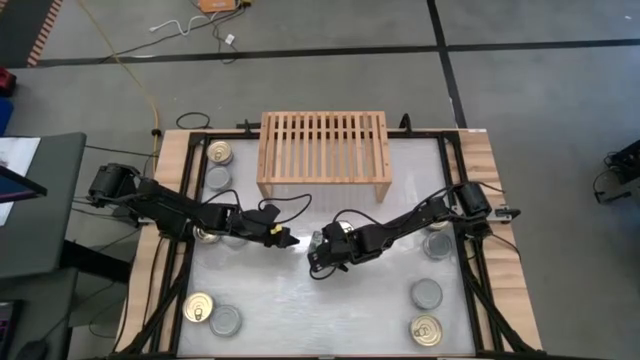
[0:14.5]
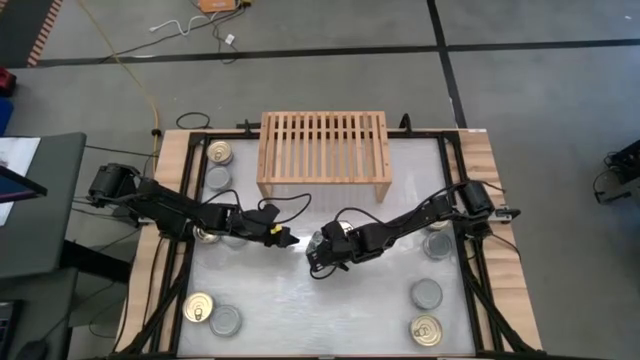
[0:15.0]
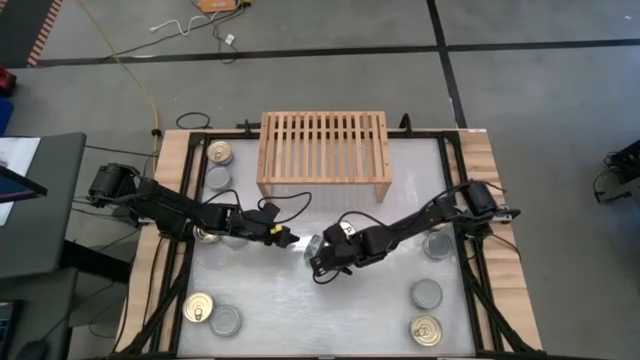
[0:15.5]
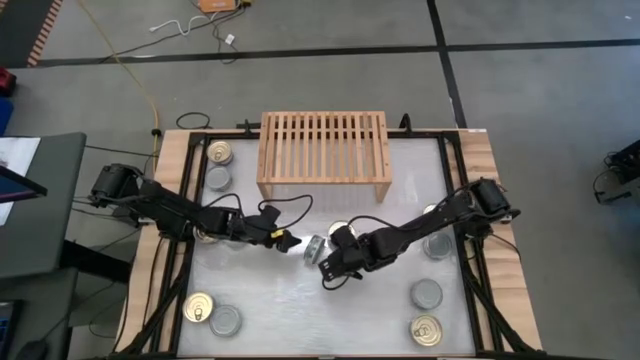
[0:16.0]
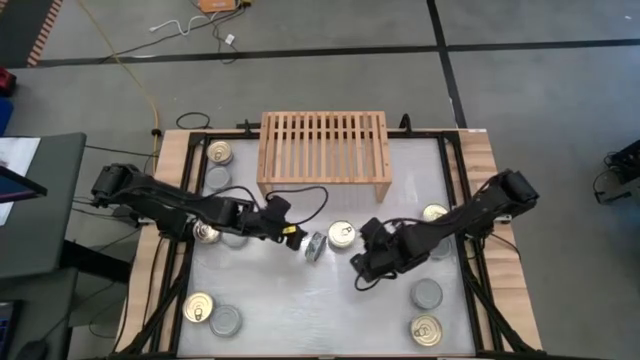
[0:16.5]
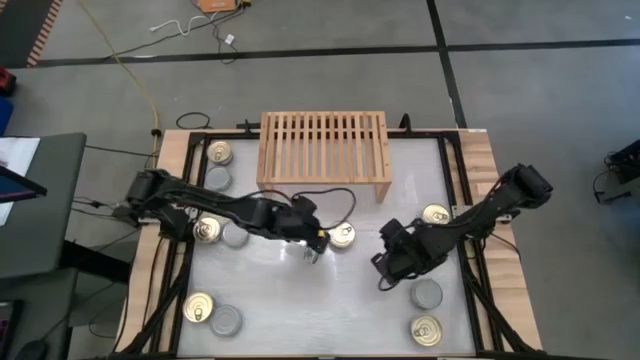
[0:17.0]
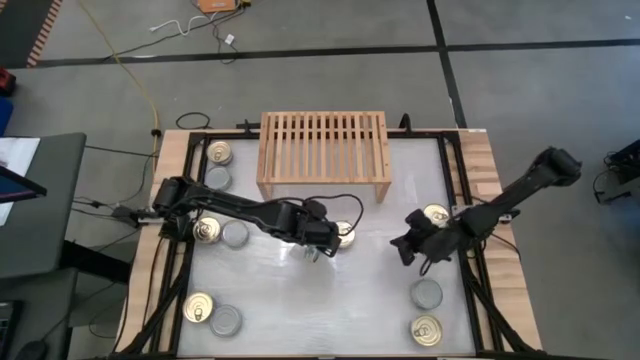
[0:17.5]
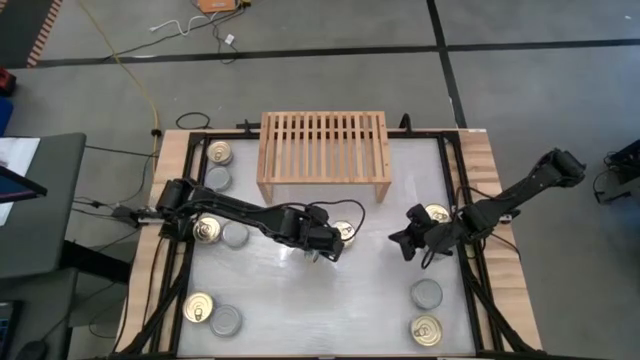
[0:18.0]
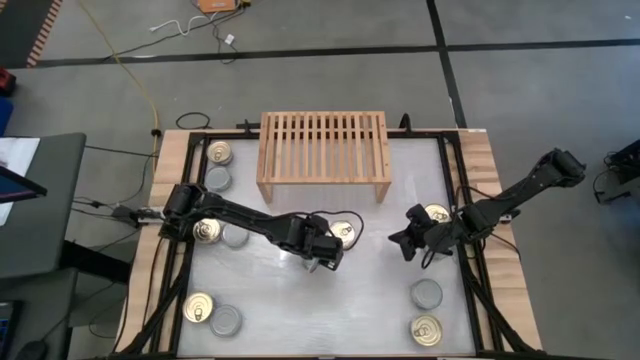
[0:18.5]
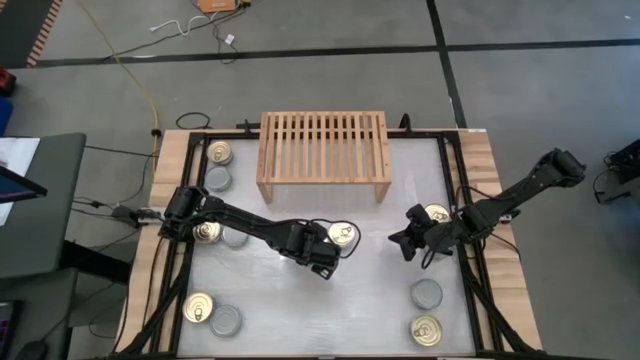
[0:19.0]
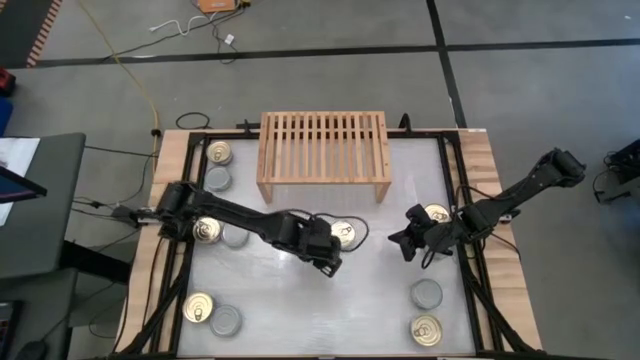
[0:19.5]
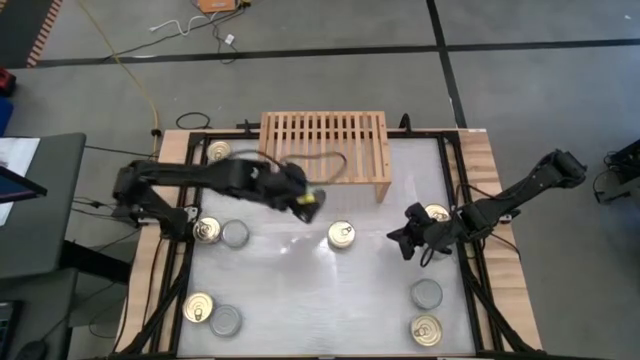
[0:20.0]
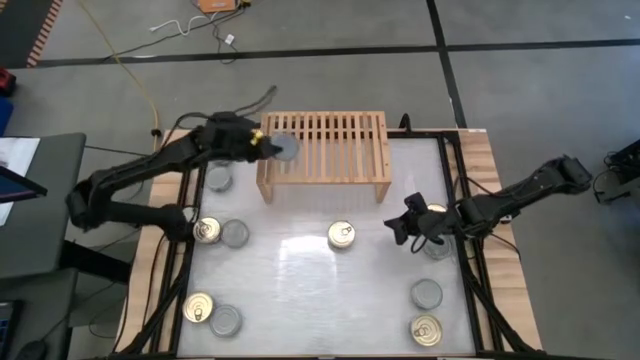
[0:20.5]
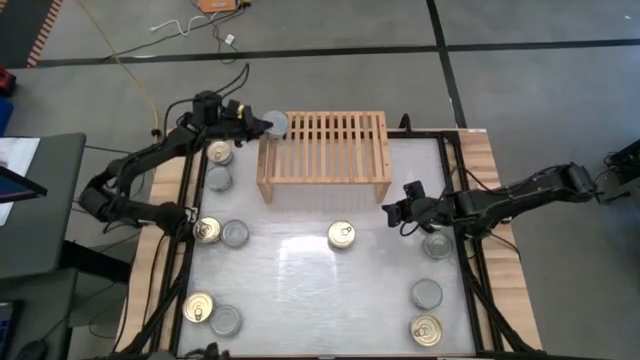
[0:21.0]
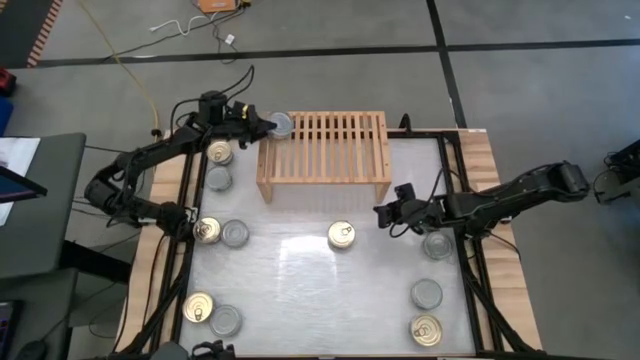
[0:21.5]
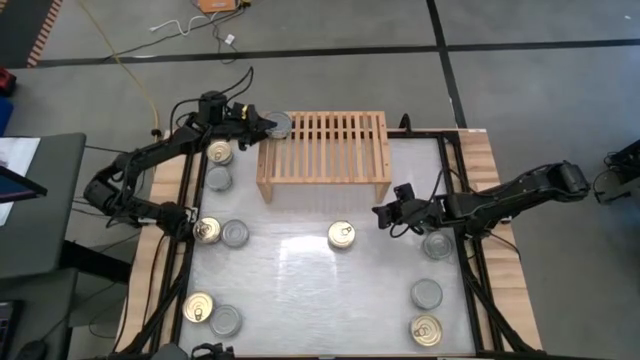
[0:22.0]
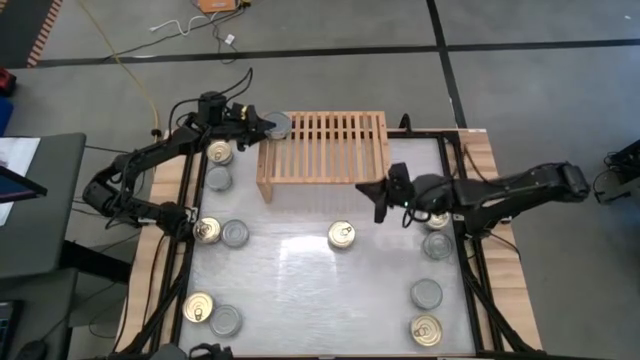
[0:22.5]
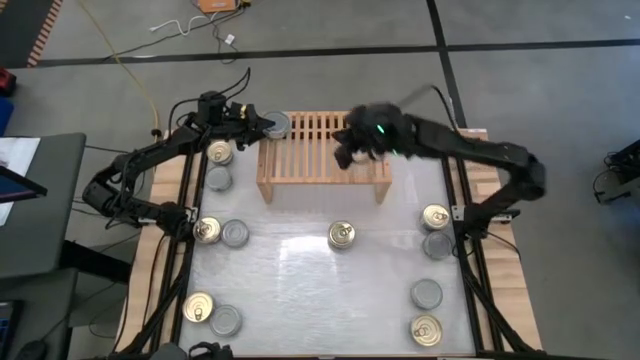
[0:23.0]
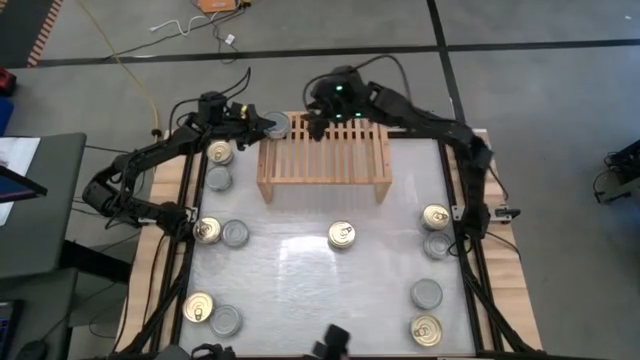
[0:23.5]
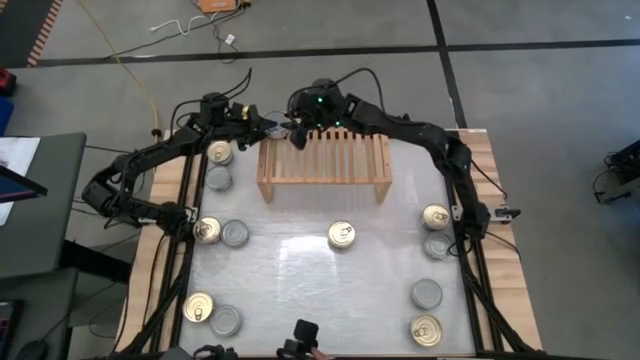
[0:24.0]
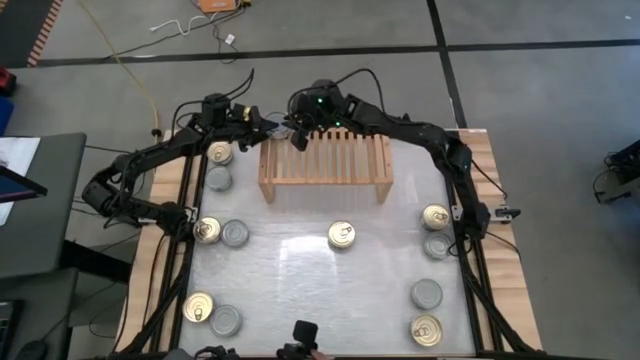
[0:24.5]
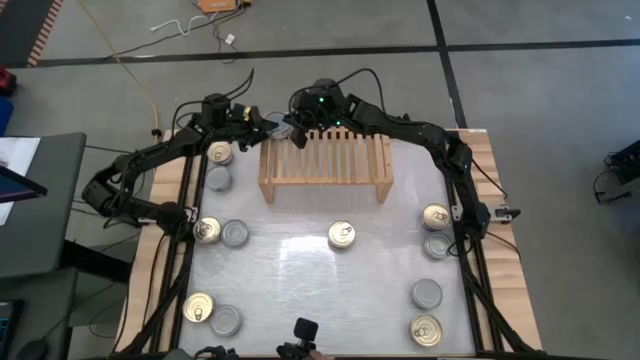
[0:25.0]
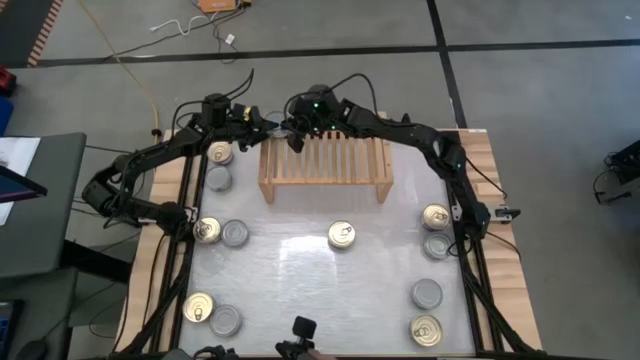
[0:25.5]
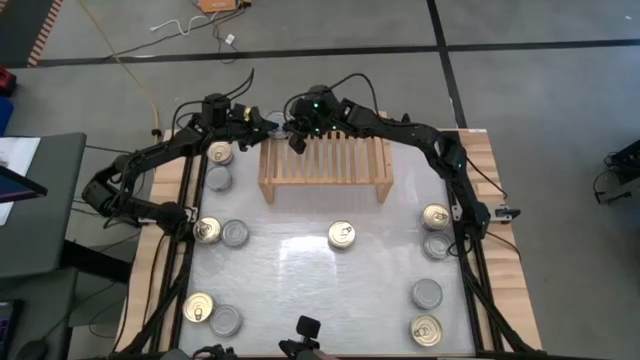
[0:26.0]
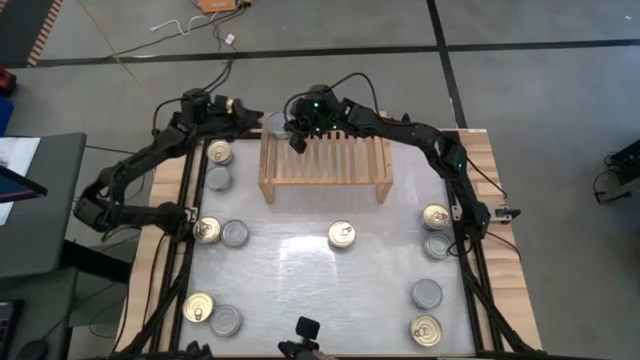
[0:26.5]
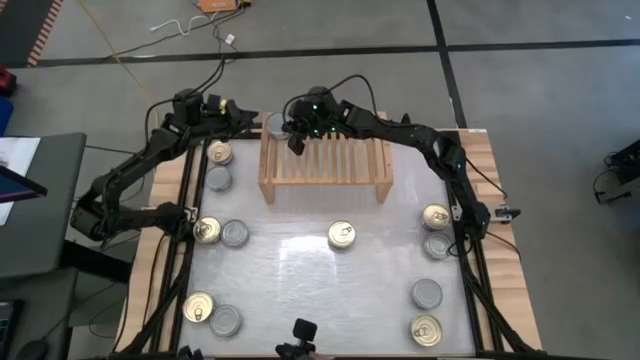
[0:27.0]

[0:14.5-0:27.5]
Task: Stack canned seafood by type on shelf
Put the green tuna can on the shelf

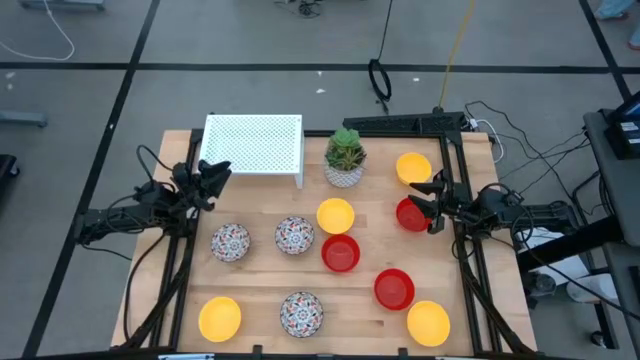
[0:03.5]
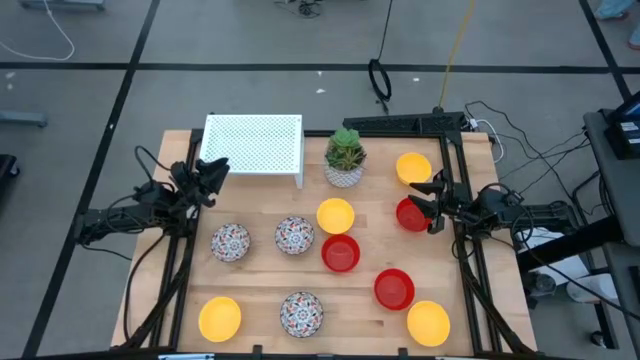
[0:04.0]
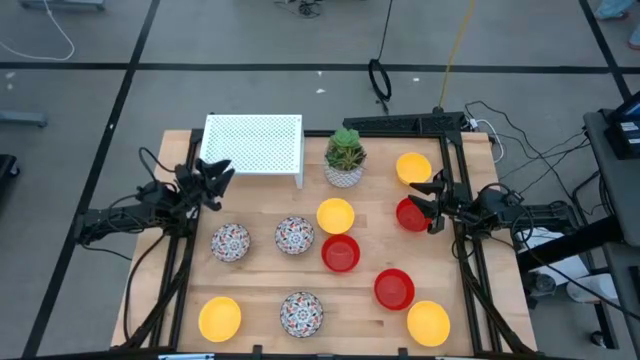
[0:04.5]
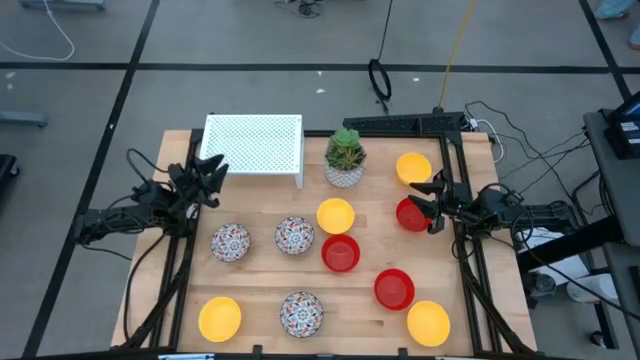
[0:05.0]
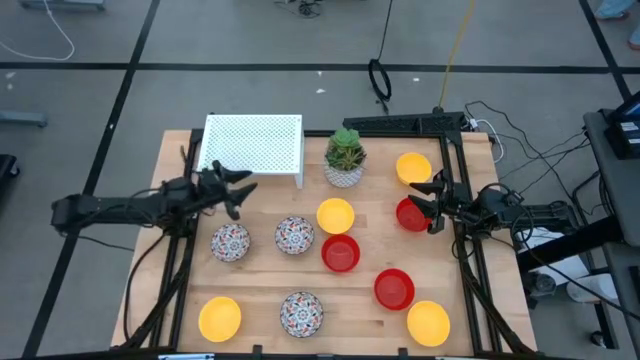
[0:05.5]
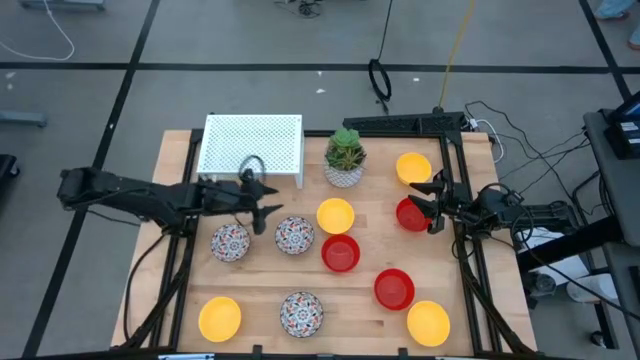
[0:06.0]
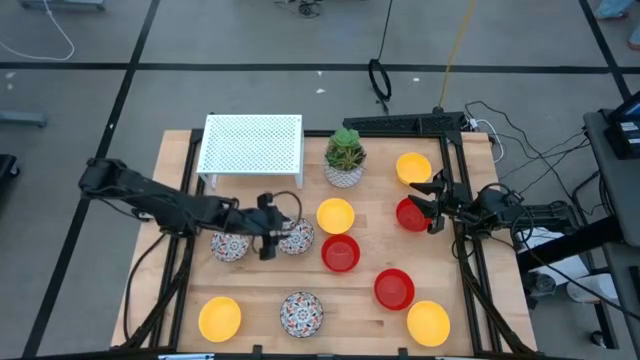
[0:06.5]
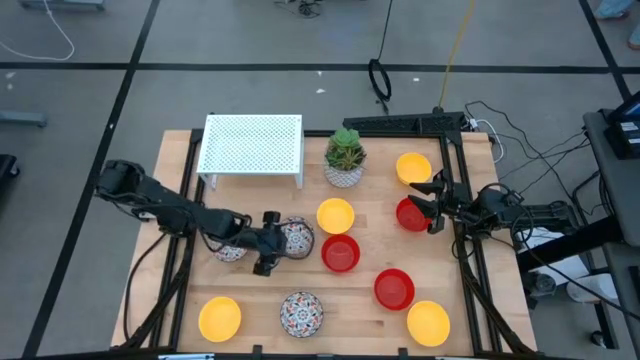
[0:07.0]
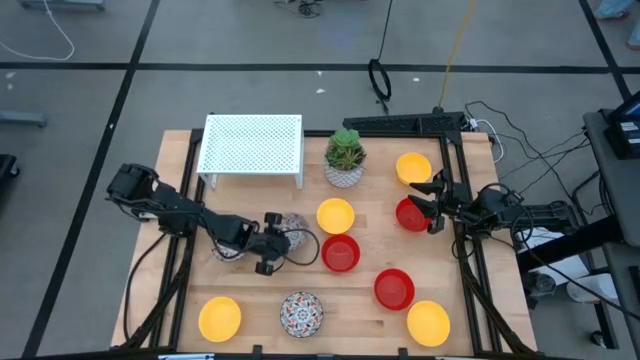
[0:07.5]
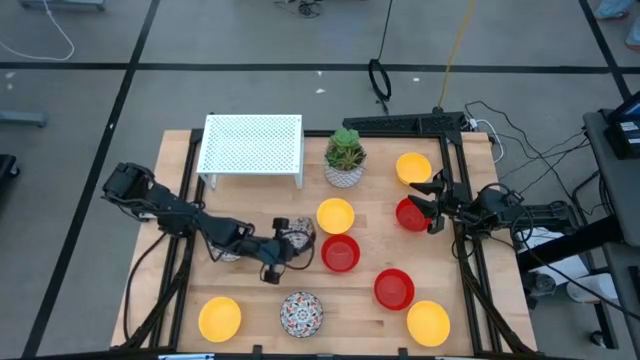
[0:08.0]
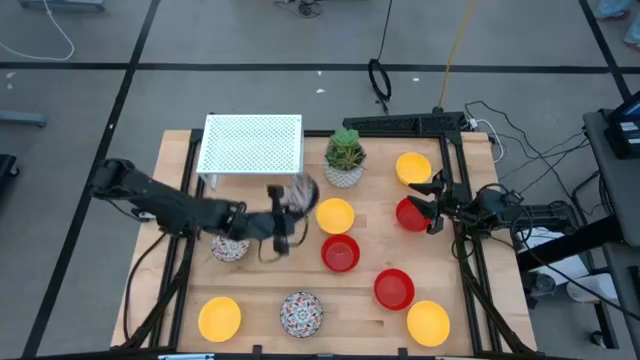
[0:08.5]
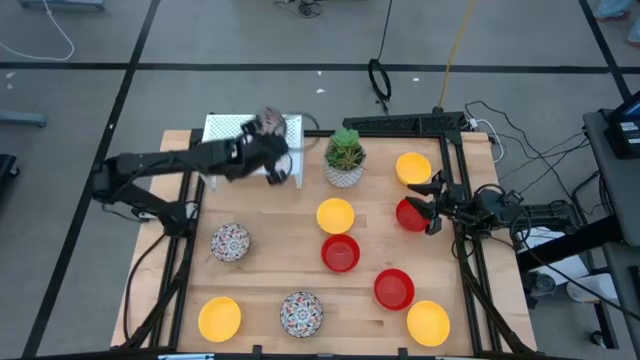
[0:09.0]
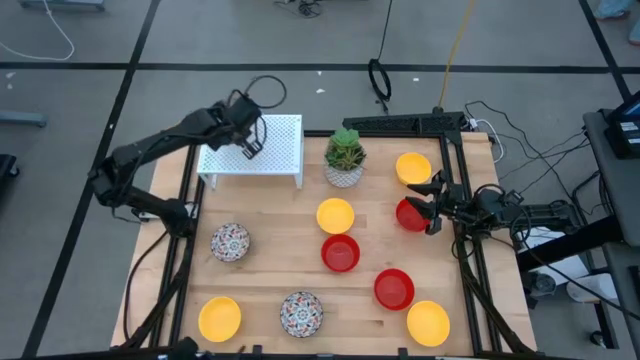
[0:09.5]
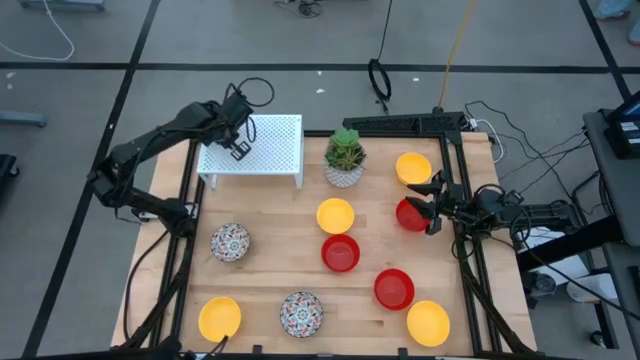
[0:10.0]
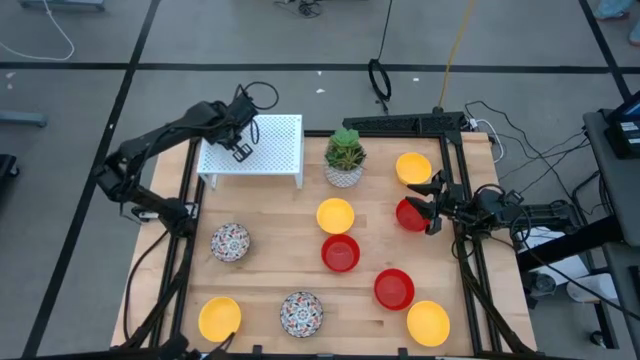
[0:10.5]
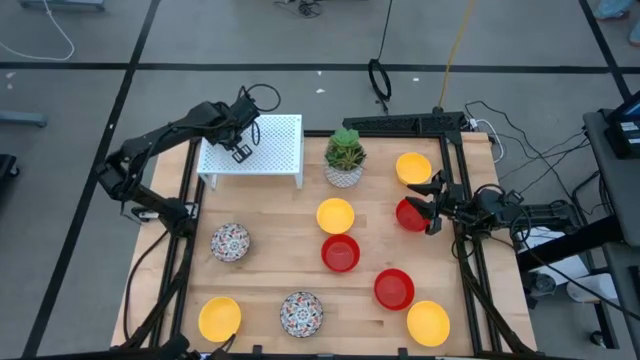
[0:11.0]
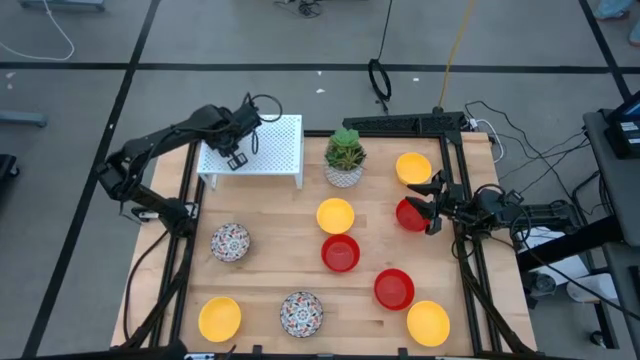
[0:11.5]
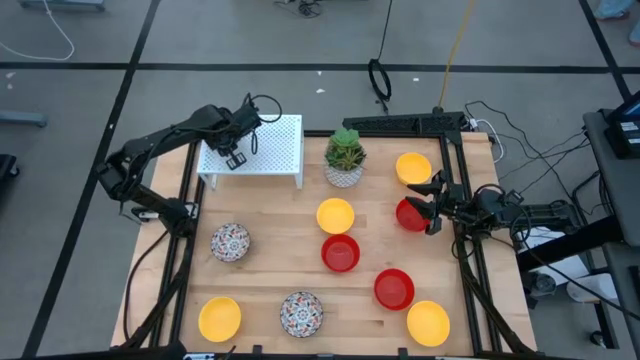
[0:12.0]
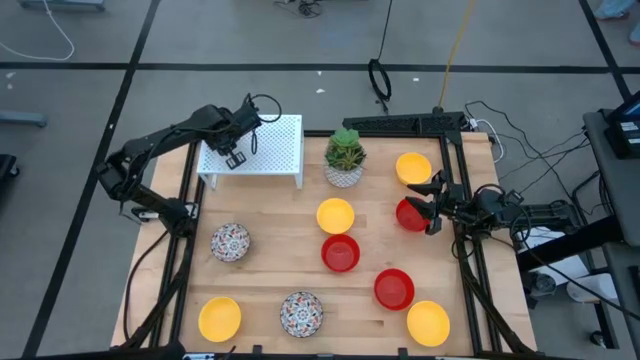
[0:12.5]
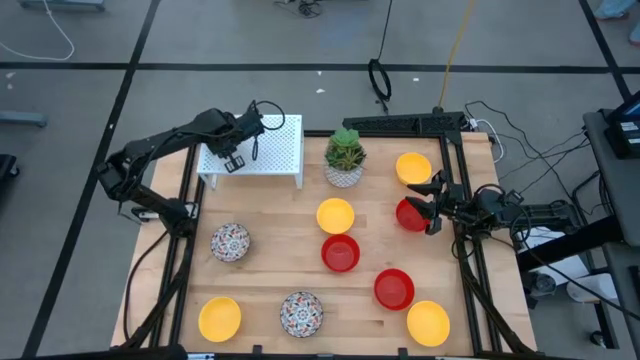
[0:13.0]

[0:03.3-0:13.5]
Task: Pick & Place Mini bowls
Put the orange patterned bowl on the shelf
